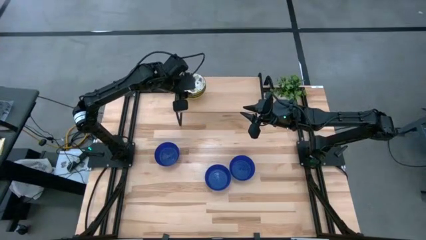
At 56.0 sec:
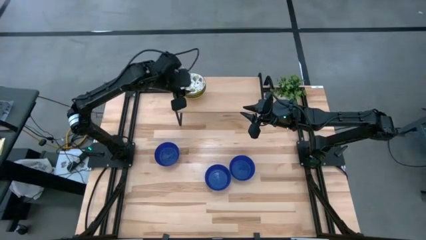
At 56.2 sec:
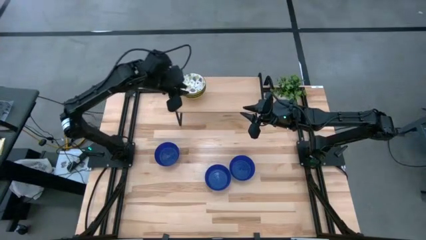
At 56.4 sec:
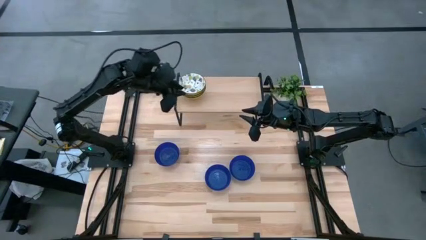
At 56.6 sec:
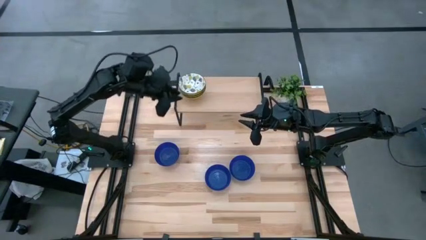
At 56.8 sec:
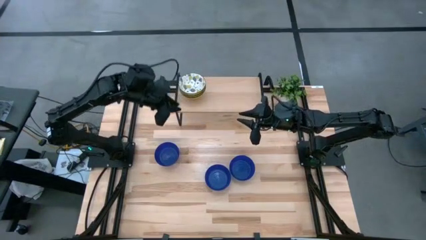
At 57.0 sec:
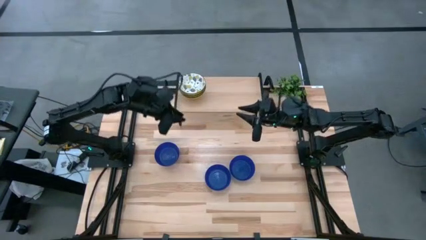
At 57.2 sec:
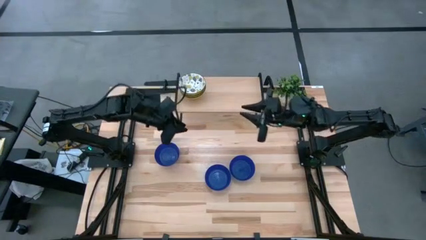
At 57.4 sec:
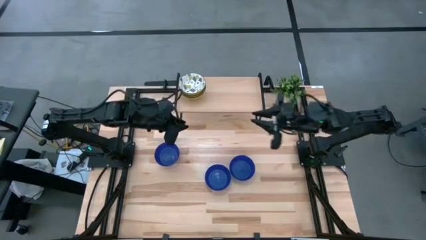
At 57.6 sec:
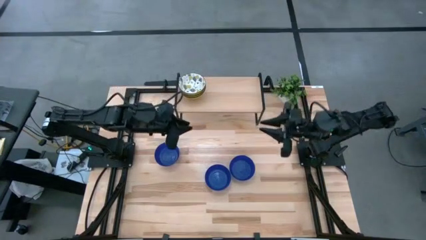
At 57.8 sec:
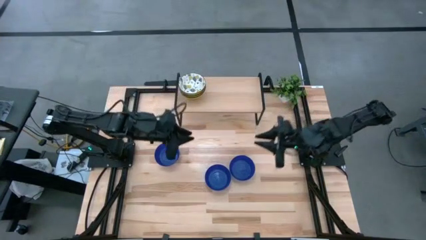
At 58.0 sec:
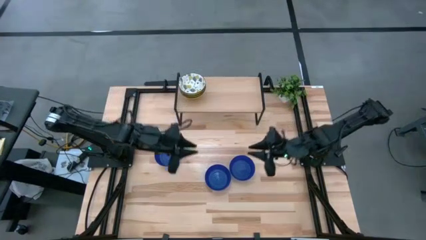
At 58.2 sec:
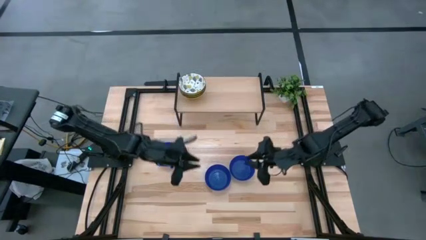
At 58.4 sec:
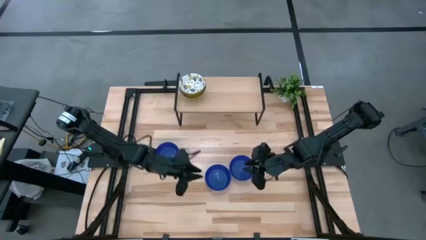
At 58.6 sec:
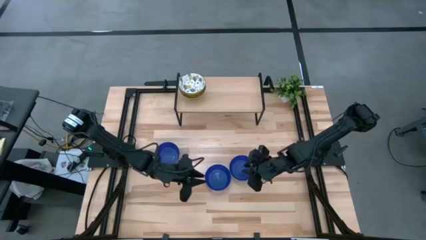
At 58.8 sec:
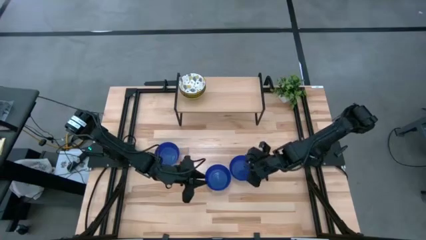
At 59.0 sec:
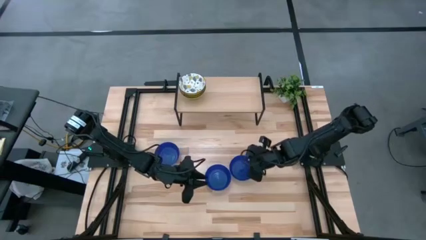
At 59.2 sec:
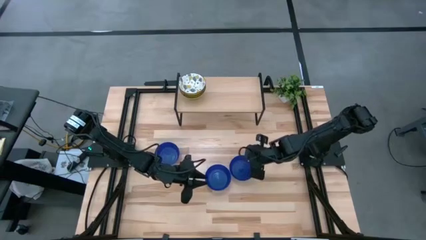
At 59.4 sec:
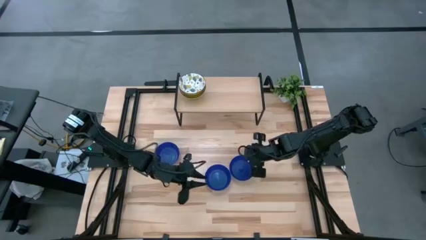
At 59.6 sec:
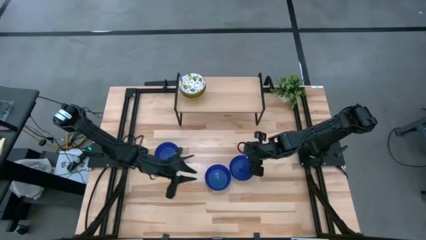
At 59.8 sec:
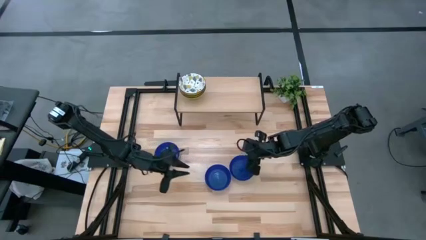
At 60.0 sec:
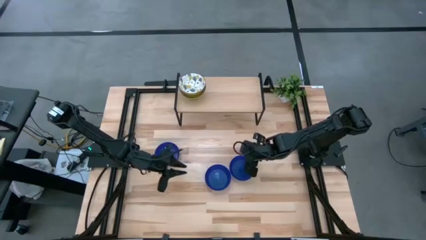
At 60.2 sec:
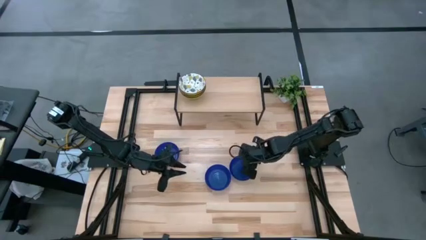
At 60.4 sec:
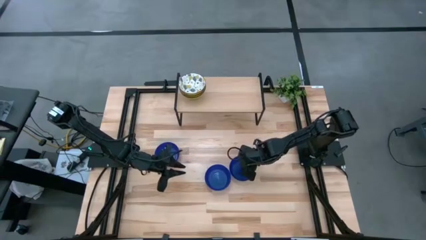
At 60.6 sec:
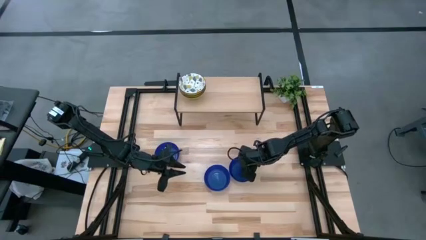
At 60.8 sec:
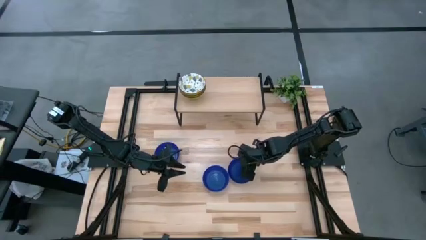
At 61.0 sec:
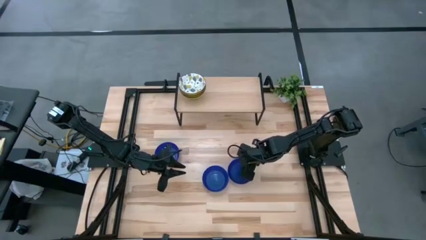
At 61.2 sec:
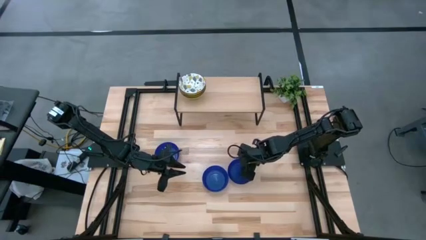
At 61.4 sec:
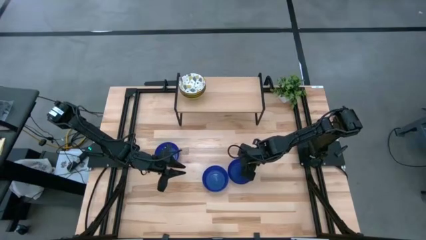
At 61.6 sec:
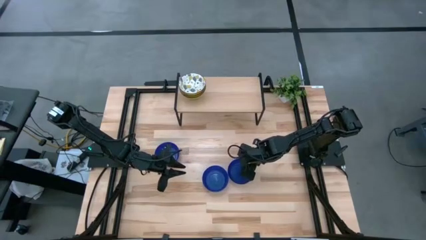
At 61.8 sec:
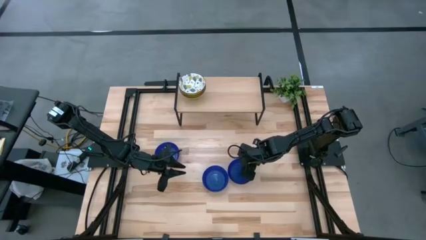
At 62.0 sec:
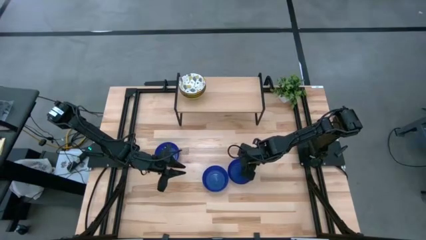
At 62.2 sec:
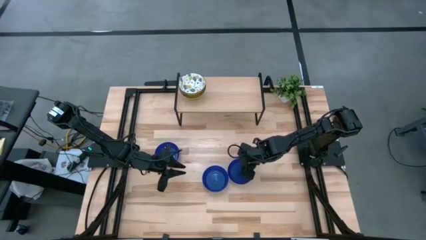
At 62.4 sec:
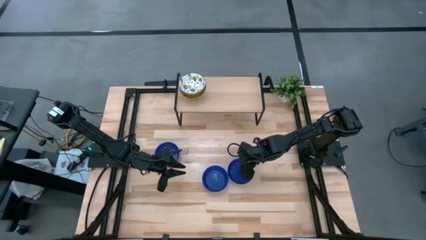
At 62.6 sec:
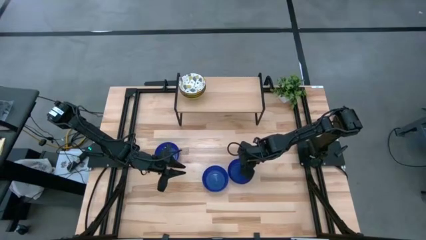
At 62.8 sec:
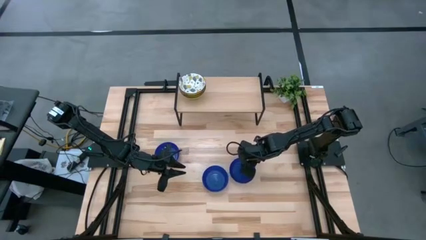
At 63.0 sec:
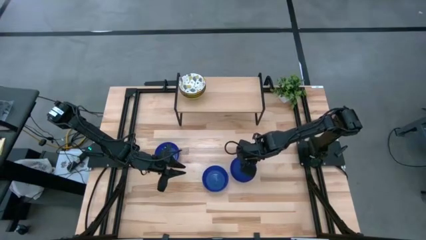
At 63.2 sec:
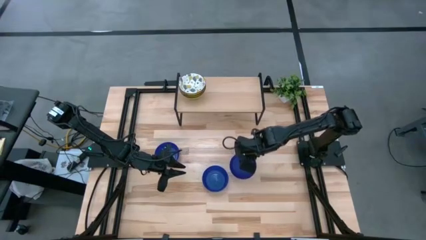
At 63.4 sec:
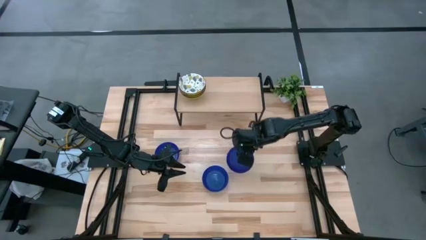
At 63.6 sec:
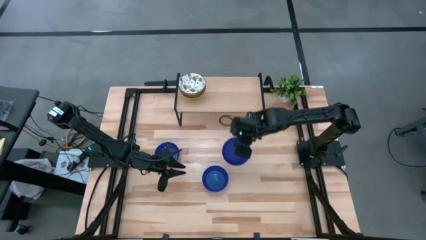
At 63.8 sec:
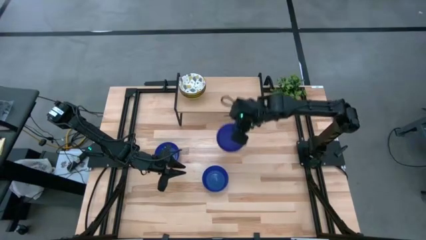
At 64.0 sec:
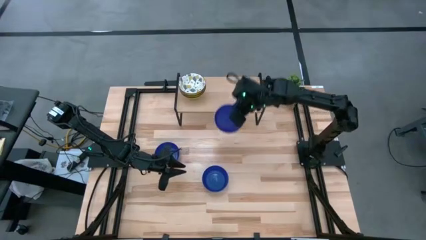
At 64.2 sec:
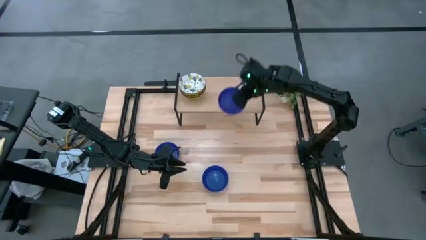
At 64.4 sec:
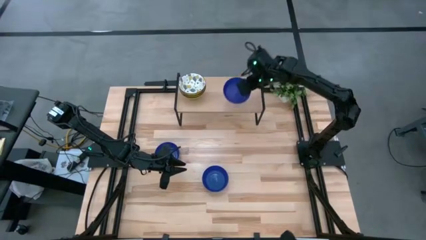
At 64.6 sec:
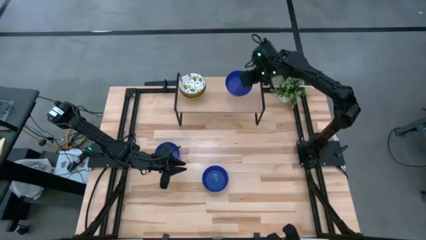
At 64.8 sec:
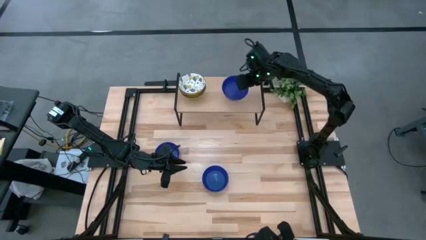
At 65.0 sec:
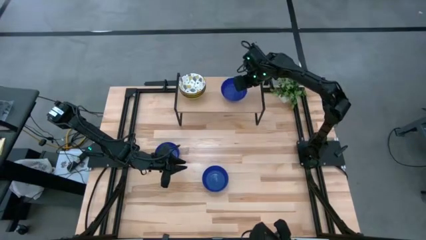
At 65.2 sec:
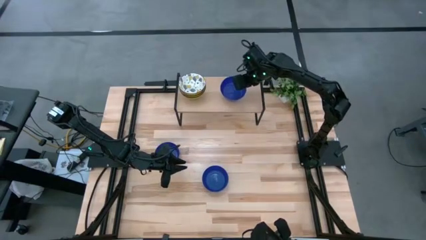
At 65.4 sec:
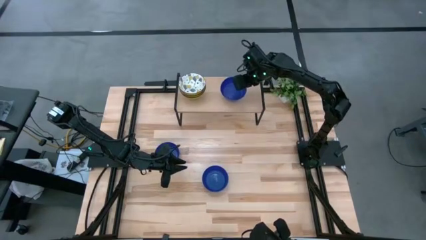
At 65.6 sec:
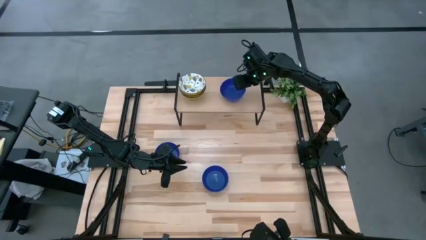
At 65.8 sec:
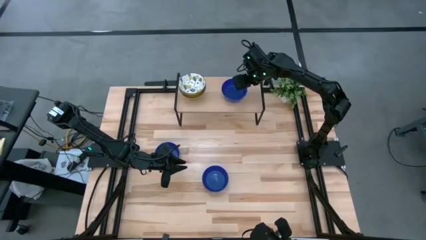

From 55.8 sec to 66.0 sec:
Task: Pick & Place Mini bowls
Put the right blue bowl on the shelf
